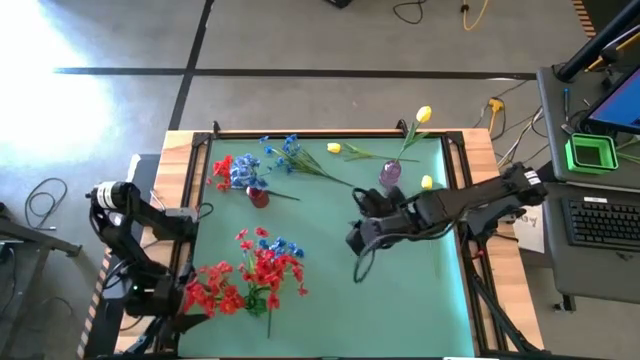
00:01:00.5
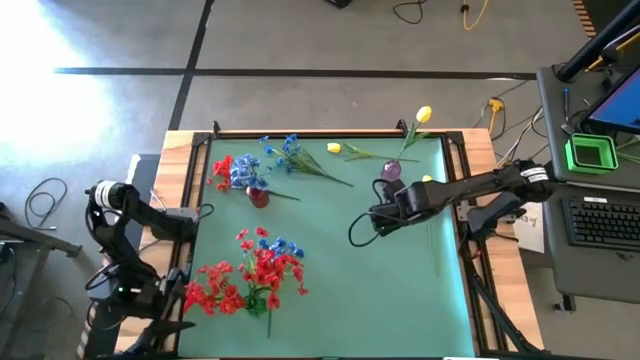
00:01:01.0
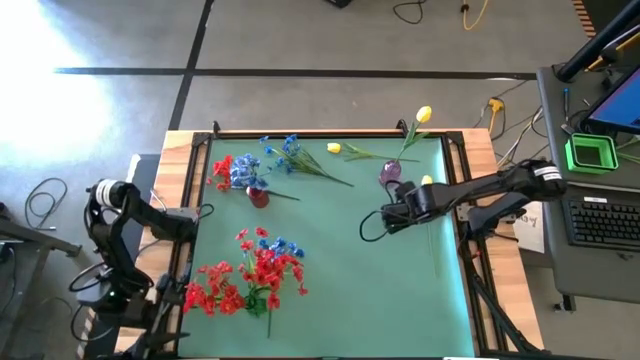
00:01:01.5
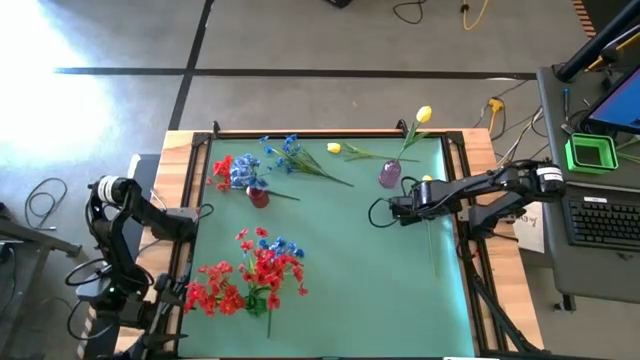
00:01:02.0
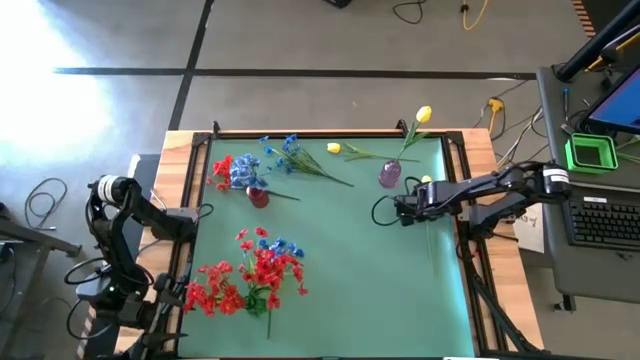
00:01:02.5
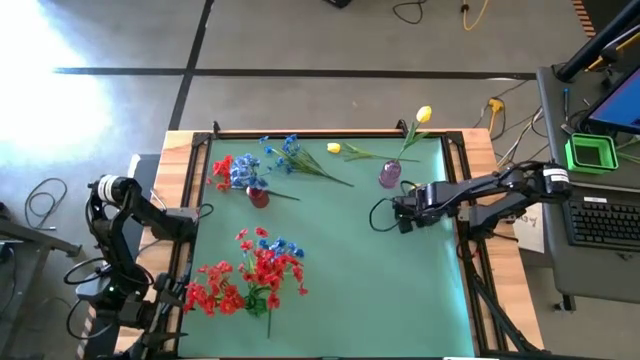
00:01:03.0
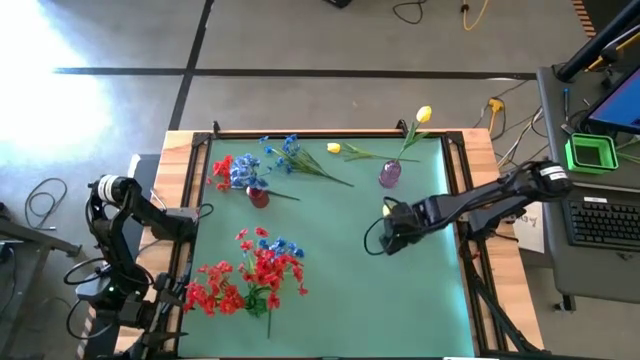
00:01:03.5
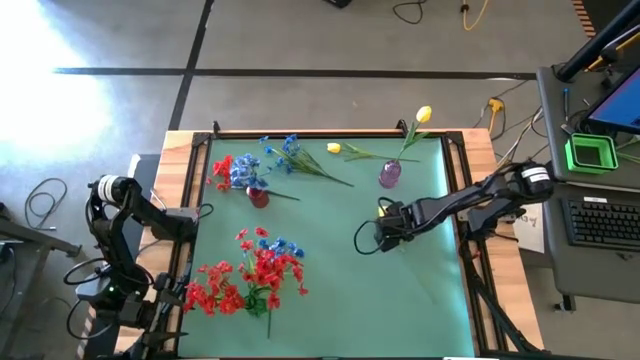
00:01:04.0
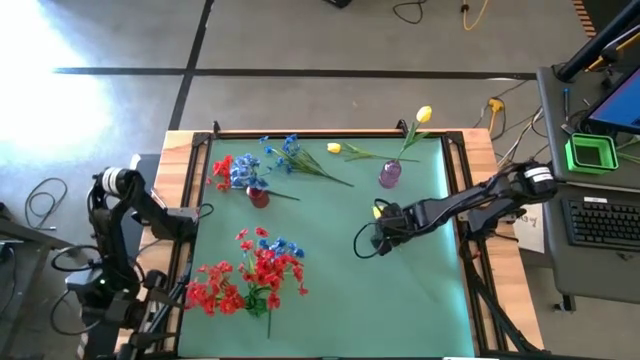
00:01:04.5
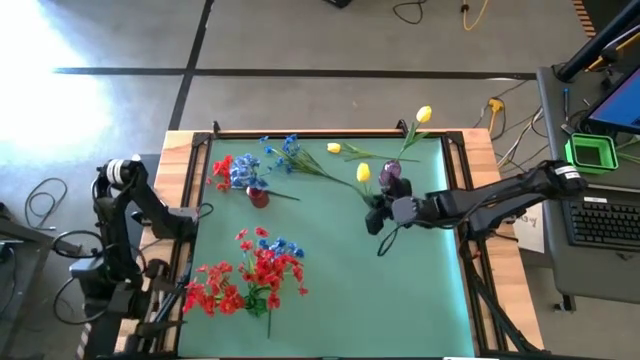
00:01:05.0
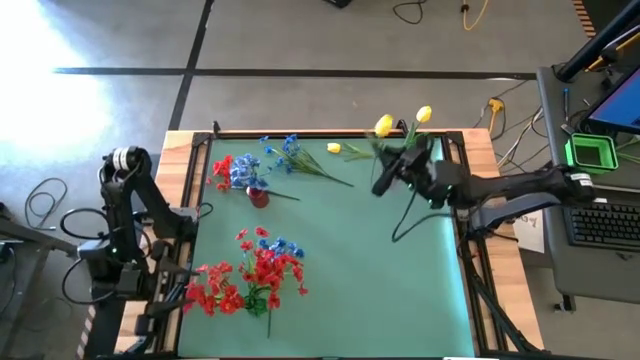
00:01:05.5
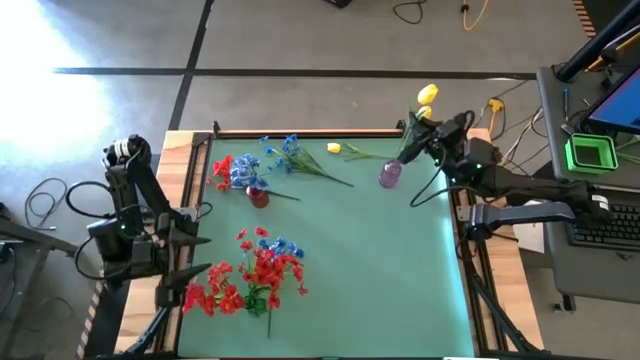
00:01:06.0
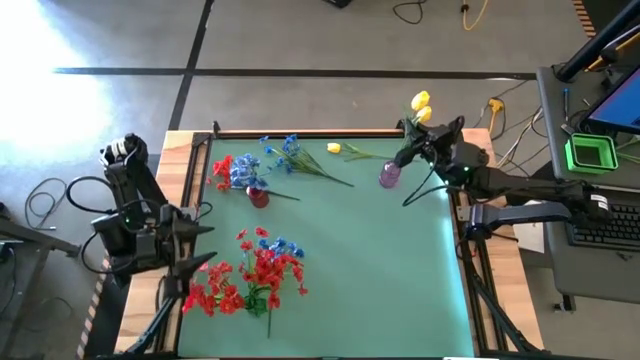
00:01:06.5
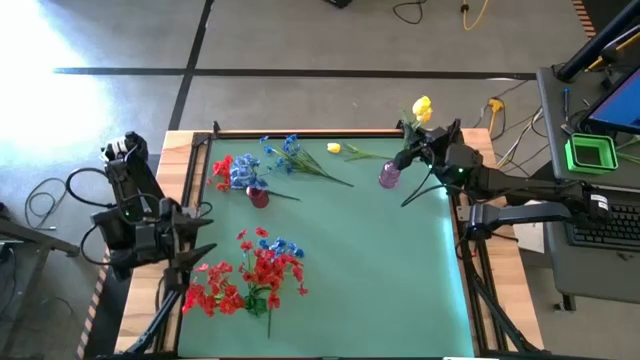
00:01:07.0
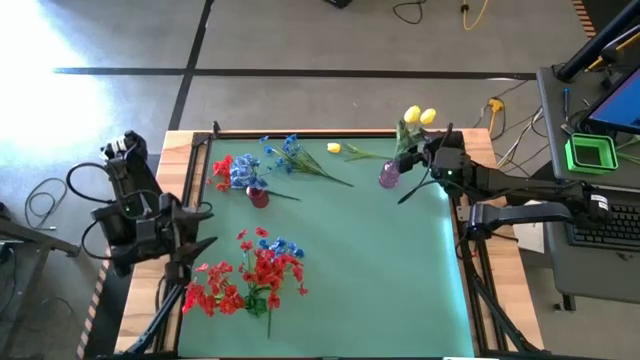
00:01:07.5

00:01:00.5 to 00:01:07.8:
Task: Sort flowers into vase by color
Put the bottom yellow tulip into the purple vase

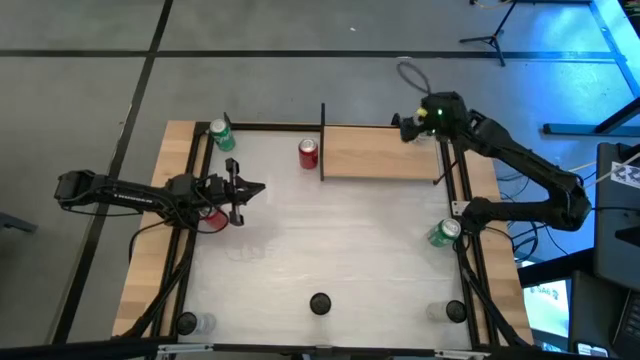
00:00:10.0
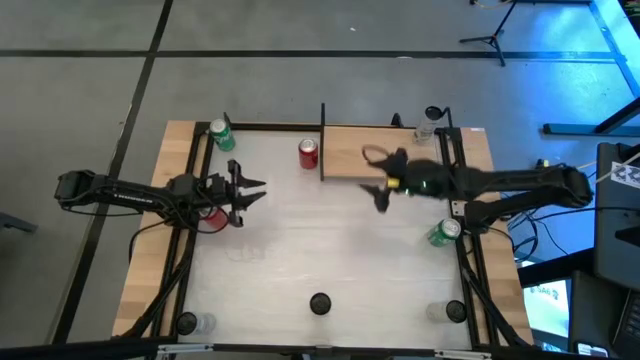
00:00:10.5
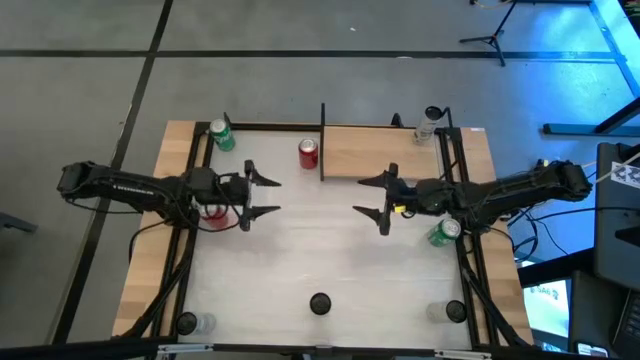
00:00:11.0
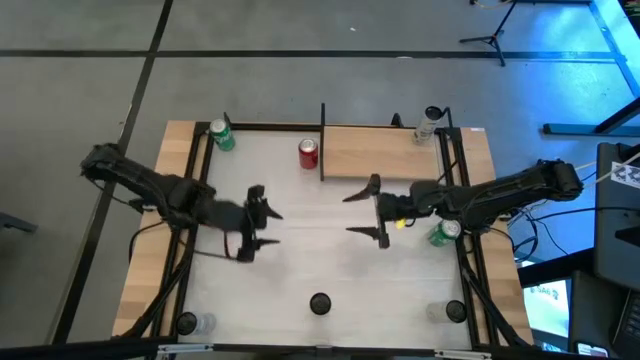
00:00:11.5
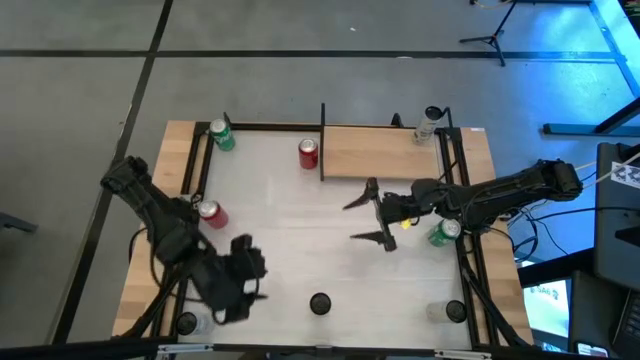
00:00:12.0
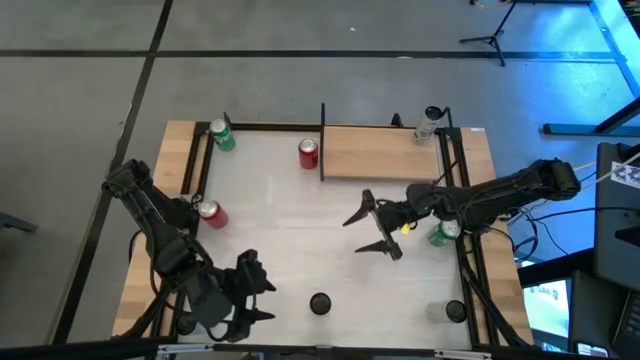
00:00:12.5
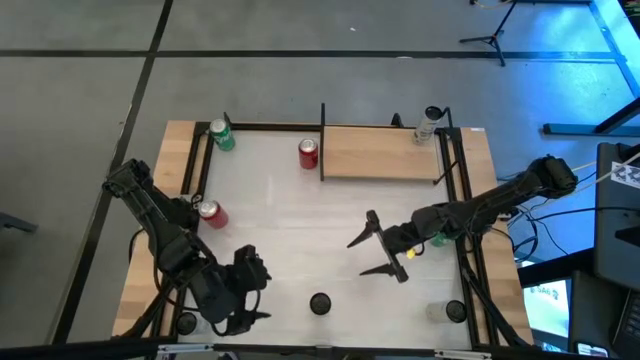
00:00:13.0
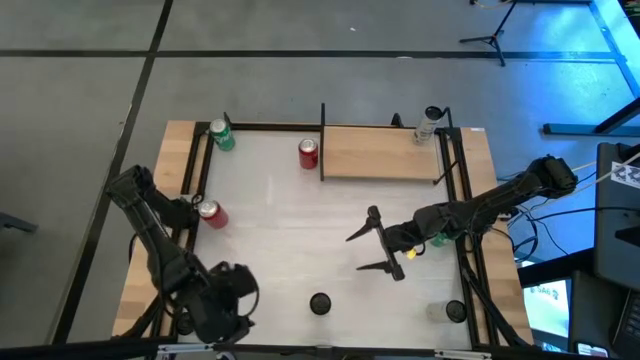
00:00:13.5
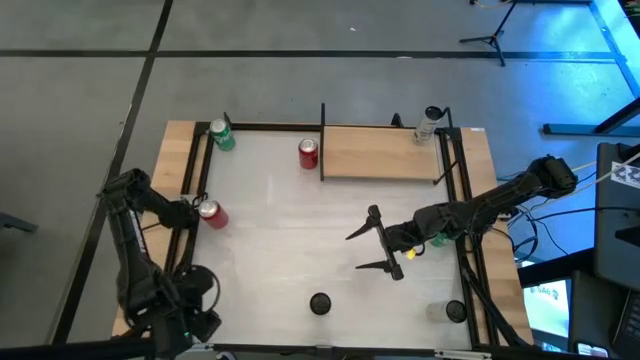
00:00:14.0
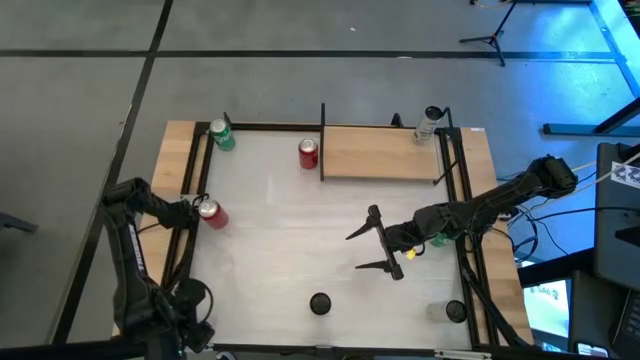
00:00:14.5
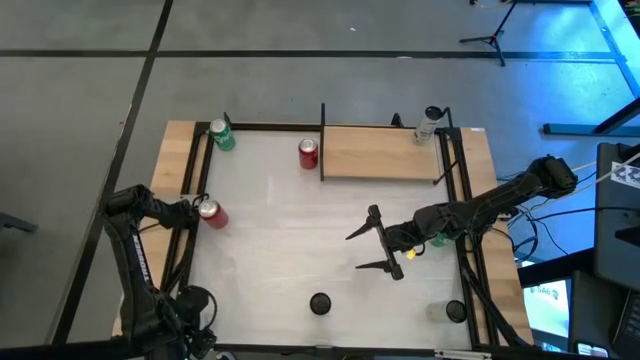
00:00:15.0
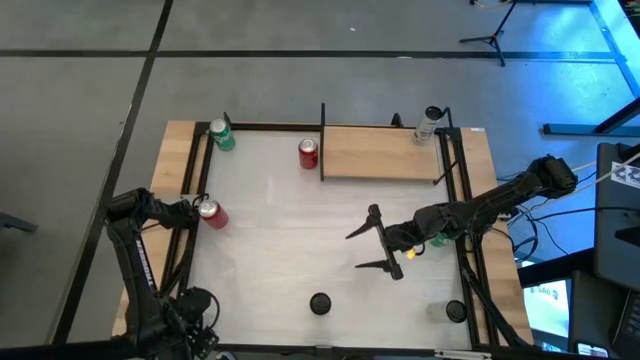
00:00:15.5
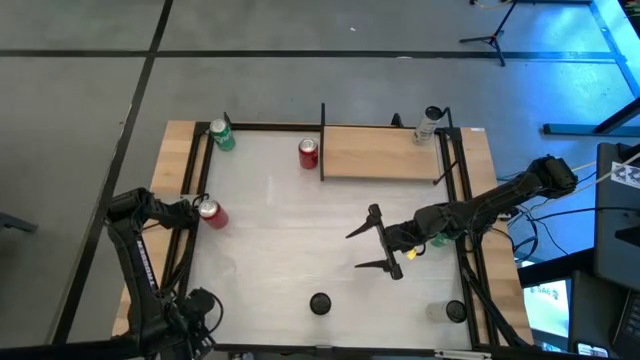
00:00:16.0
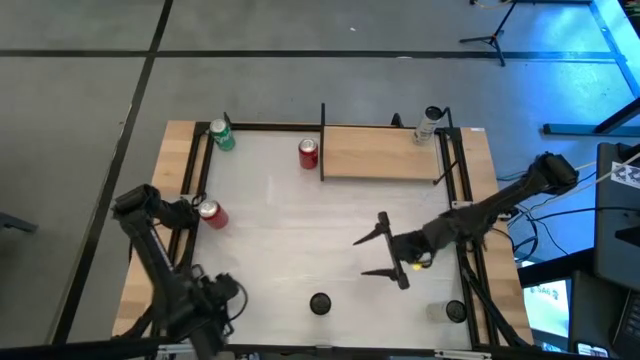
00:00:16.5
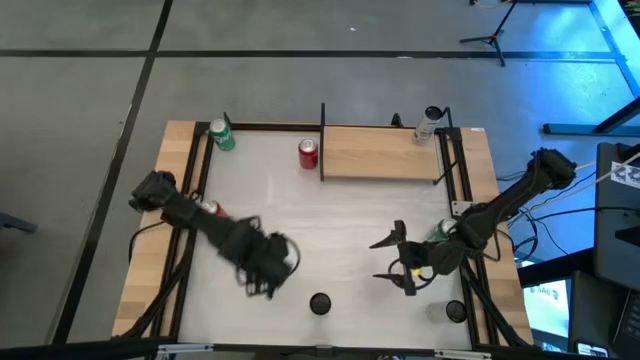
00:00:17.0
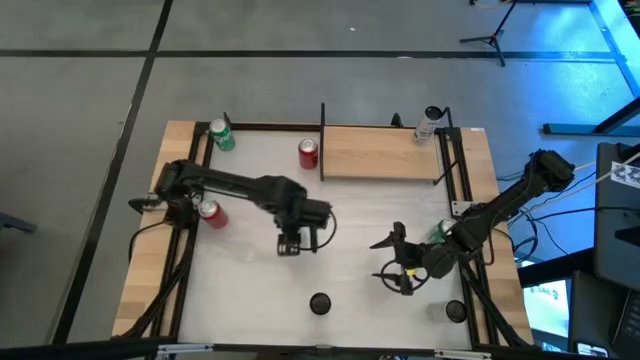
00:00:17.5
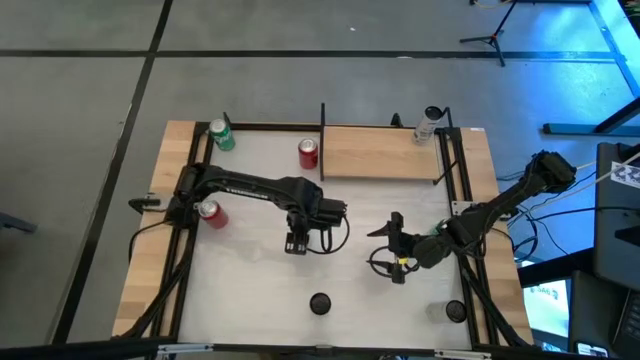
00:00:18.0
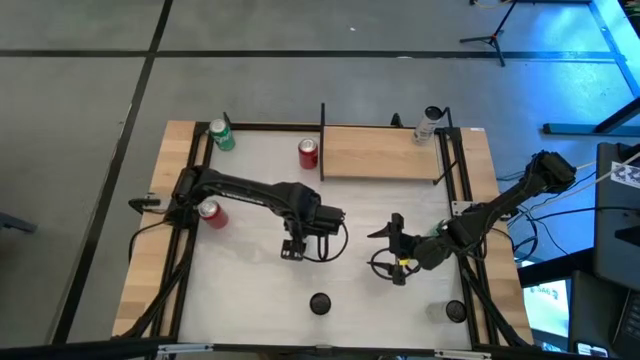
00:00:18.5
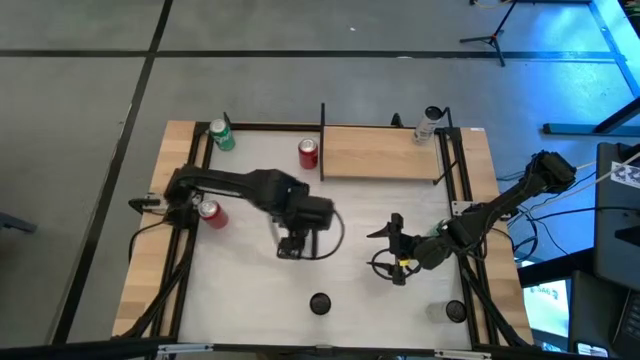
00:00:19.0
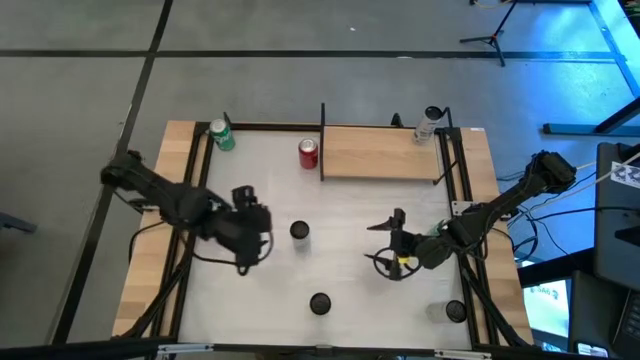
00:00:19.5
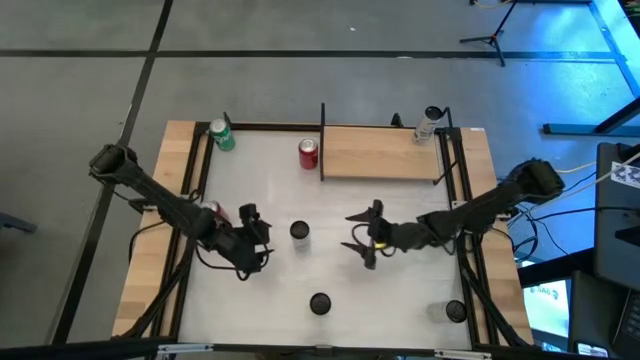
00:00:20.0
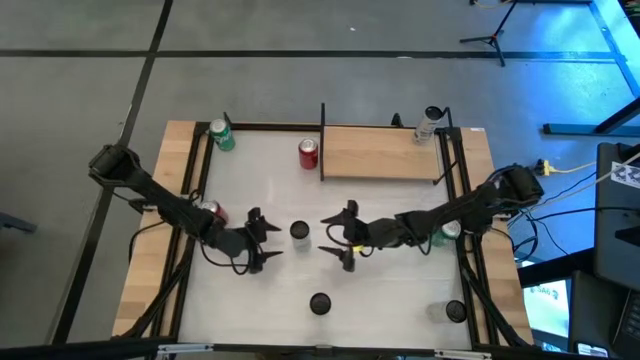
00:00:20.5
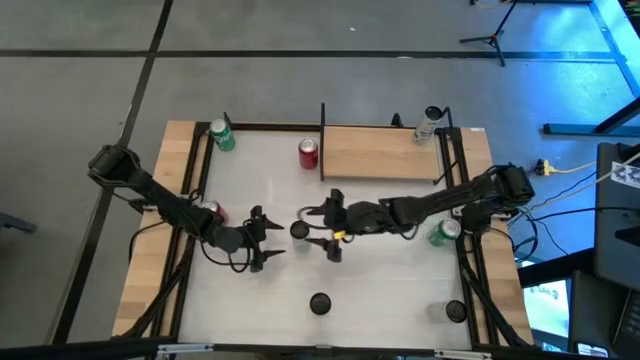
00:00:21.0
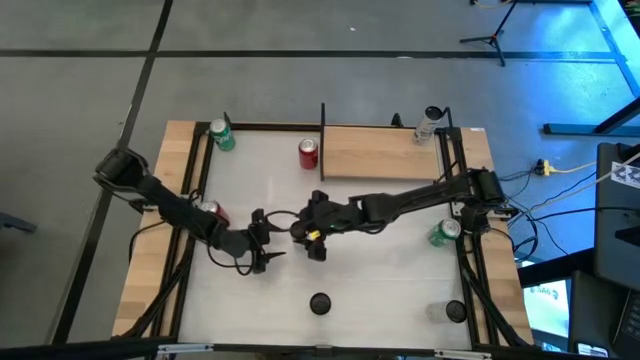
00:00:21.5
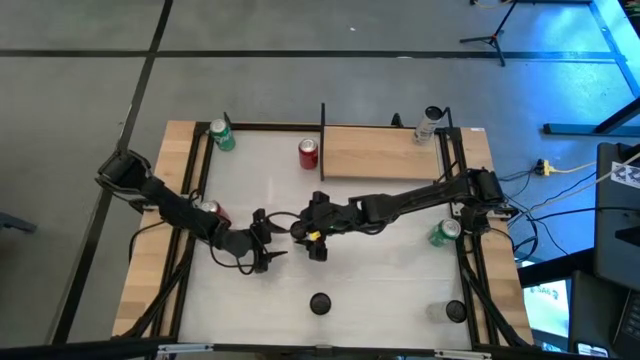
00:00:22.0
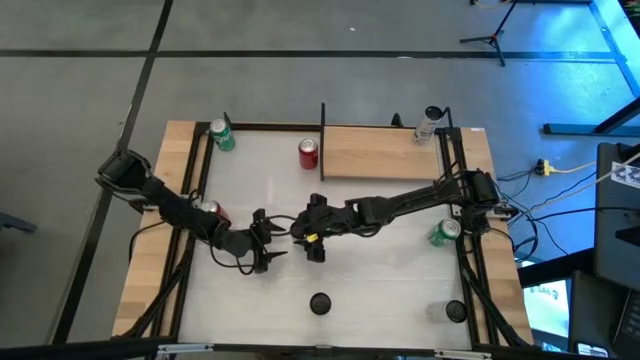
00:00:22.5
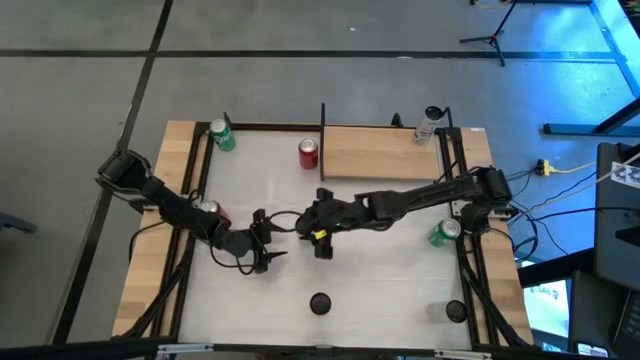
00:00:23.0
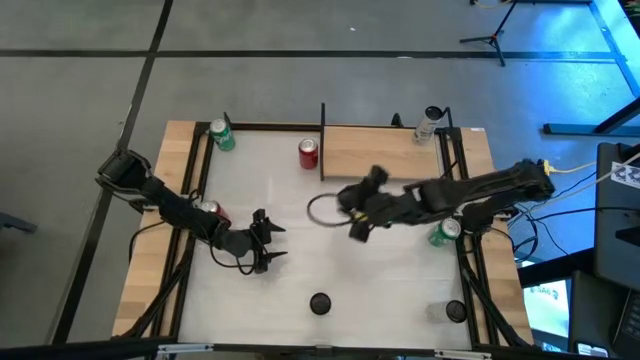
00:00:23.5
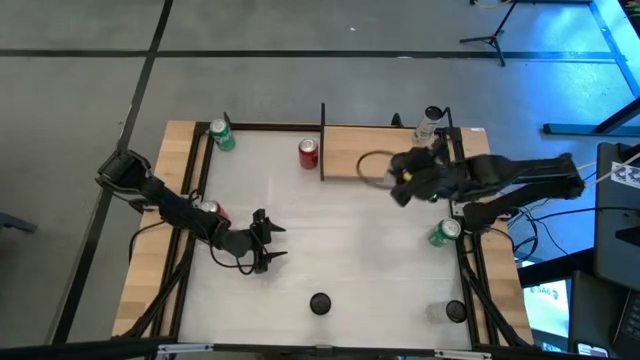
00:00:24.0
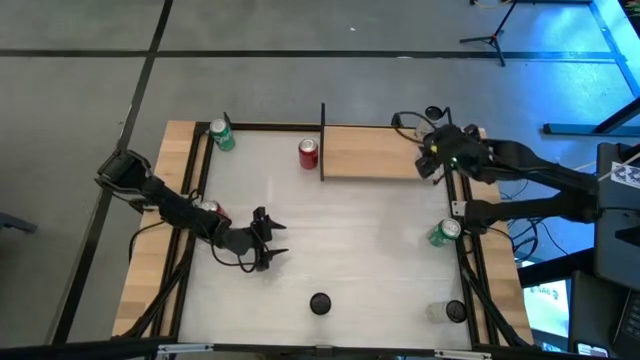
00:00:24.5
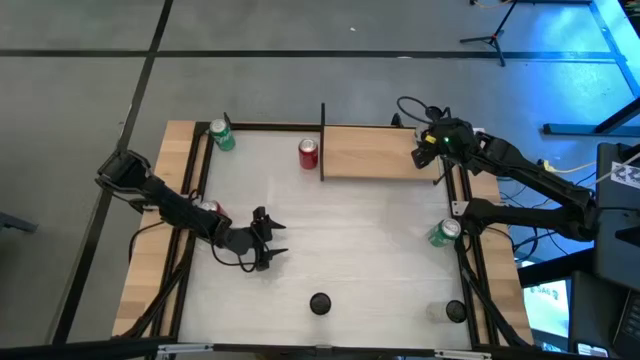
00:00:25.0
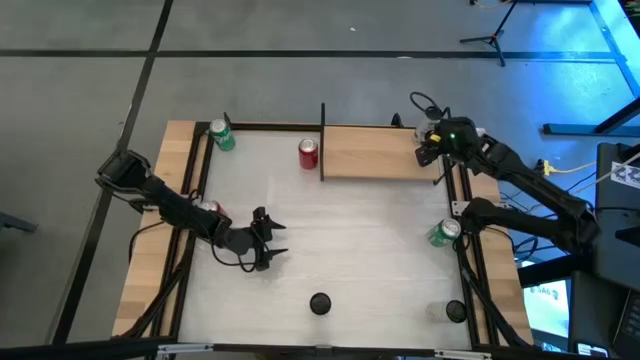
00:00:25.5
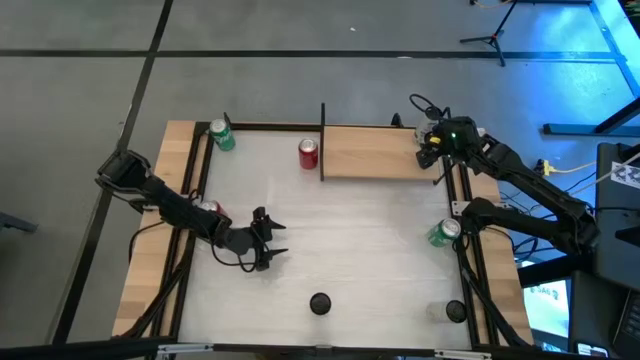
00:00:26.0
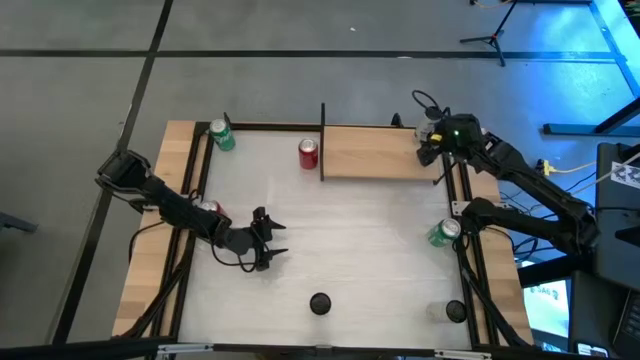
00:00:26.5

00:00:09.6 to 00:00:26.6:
Task: Place canned beverage on shelf
Put the white blue soda can on the shelf aligned with the other white blue soda can
